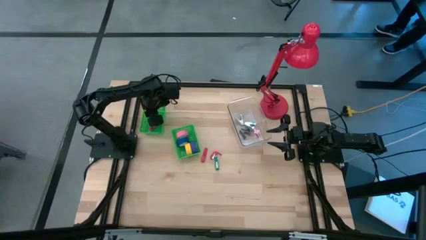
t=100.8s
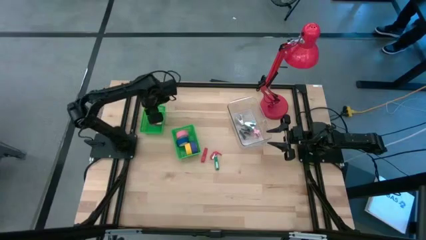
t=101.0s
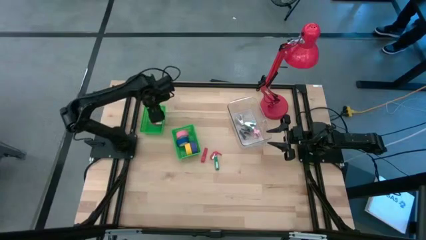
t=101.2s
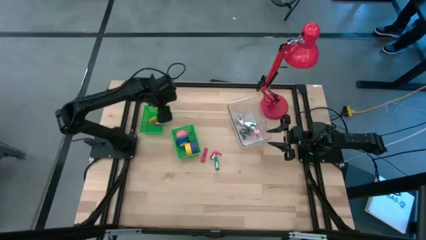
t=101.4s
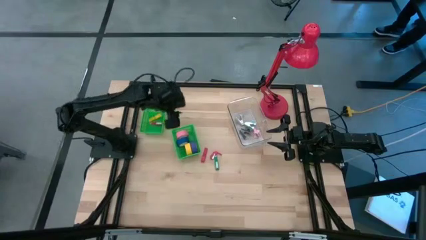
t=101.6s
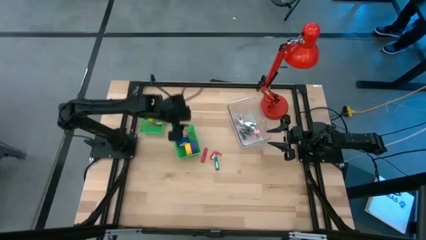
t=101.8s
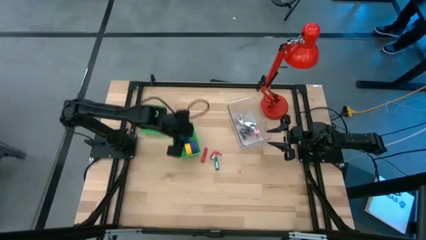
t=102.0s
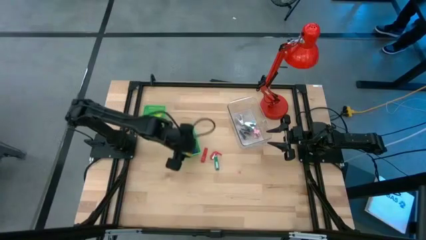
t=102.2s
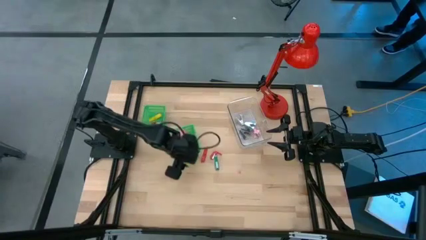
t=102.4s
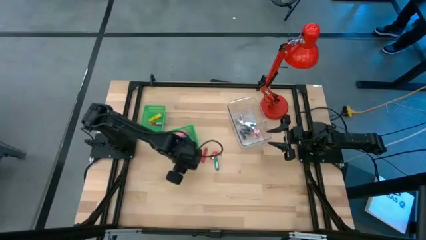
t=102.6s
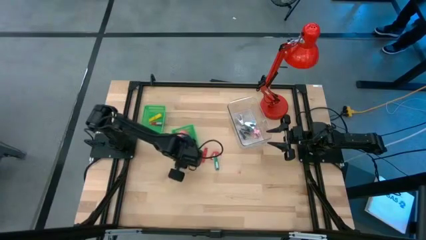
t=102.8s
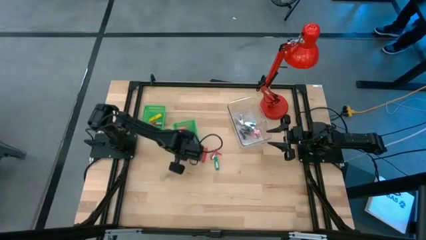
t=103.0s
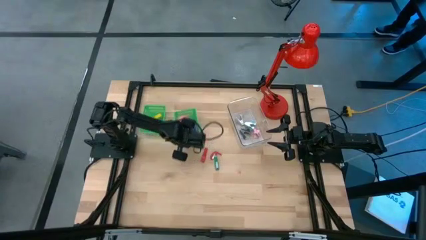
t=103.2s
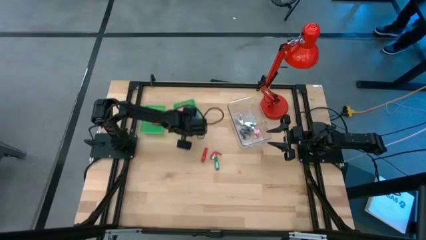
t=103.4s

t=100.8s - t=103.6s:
Task: Pick and place Stapler, Stapler remover, tape
Adjust the right green bin

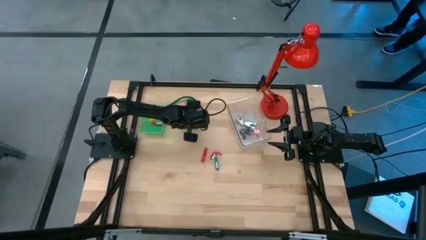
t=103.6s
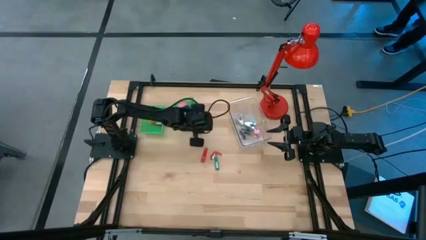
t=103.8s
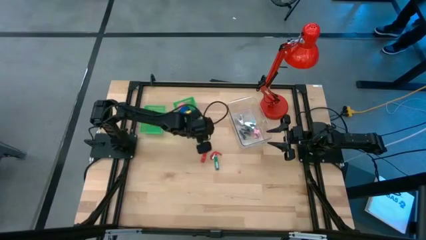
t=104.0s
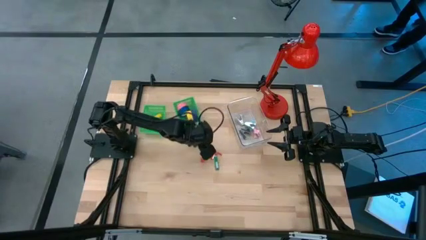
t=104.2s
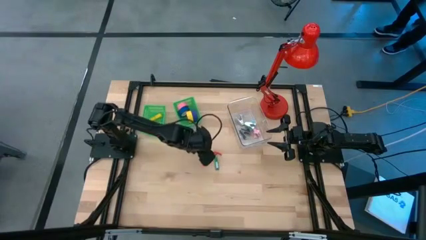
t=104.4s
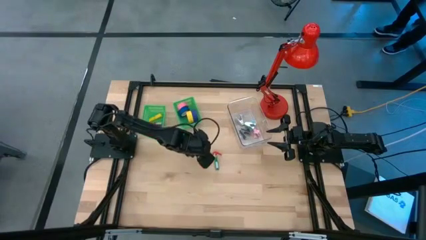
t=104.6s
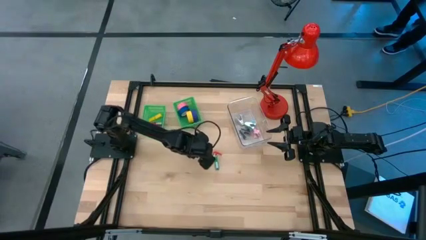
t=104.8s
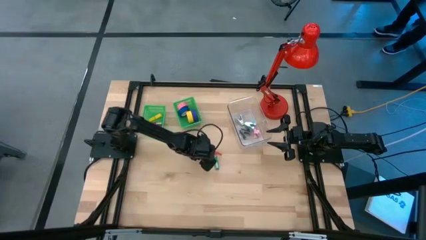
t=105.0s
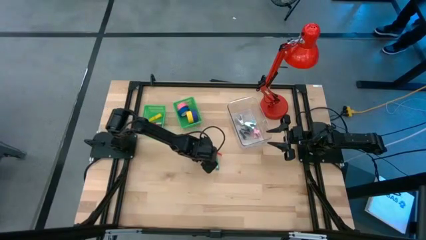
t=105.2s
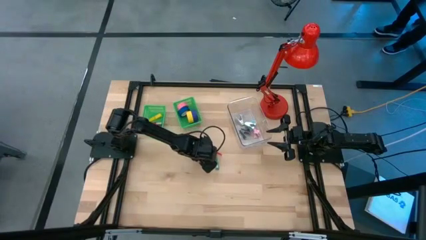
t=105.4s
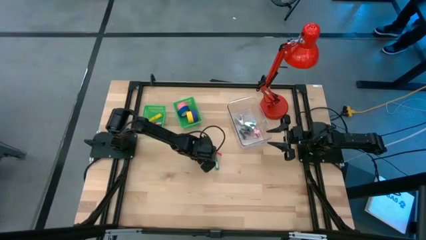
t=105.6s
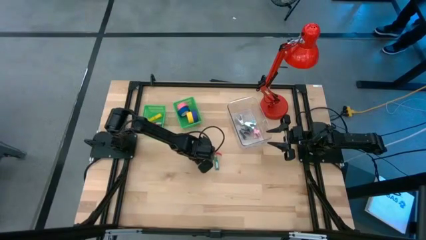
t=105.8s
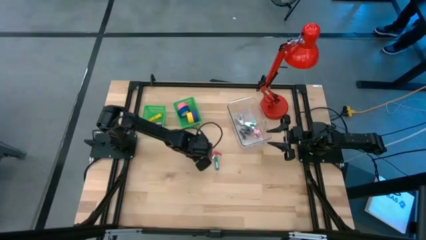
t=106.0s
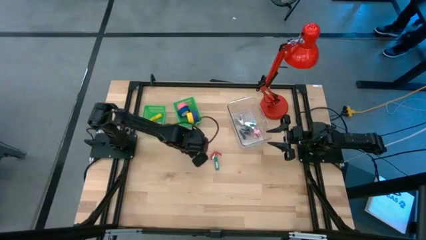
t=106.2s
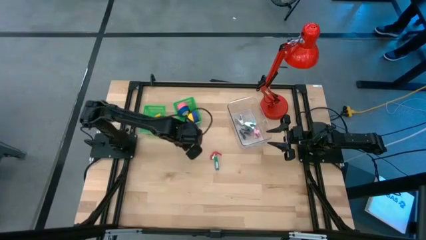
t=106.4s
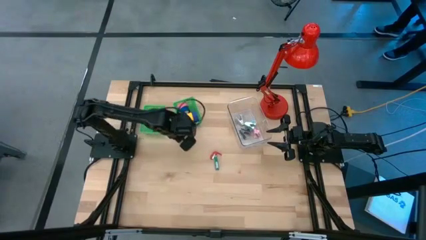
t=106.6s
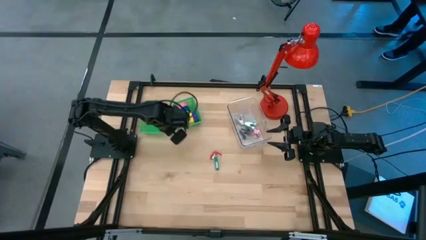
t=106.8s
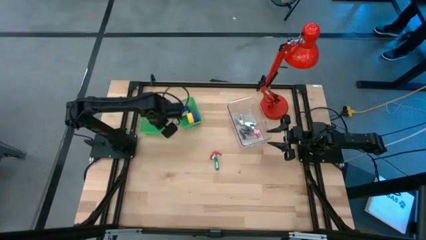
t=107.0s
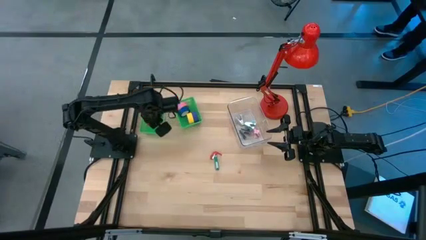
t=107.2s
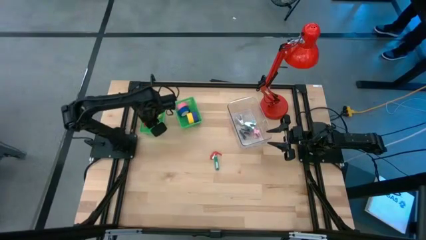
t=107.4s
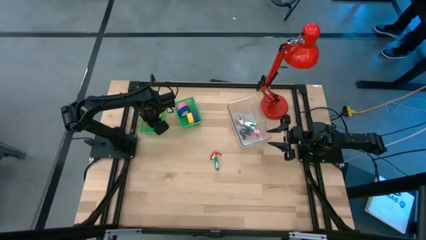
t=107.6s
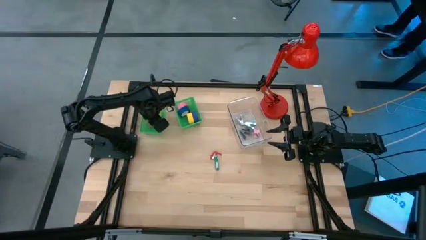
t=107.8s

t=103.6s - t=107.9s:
Put the red stapler into the left green bin

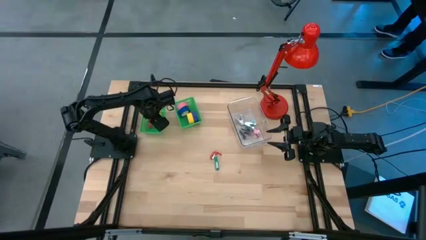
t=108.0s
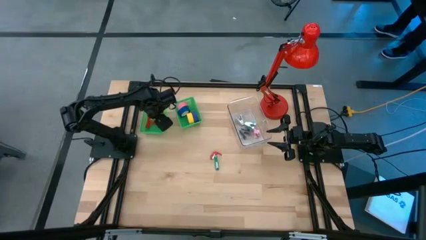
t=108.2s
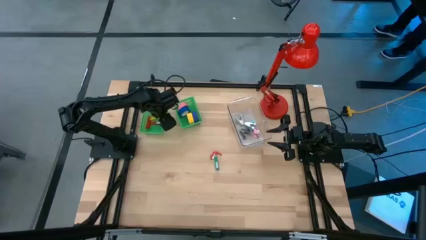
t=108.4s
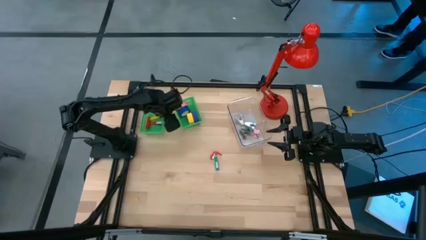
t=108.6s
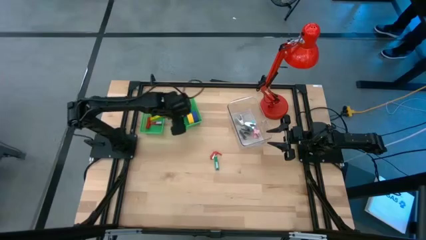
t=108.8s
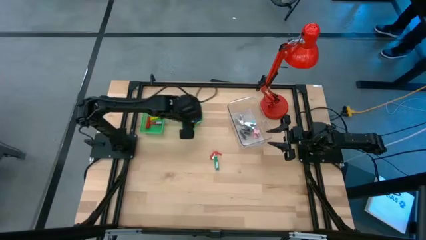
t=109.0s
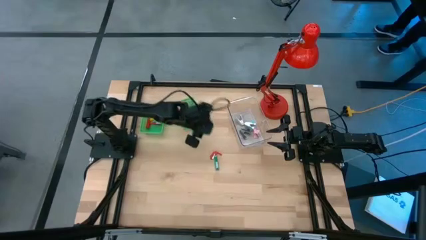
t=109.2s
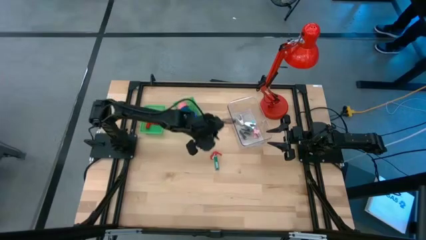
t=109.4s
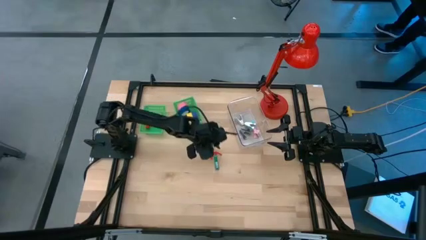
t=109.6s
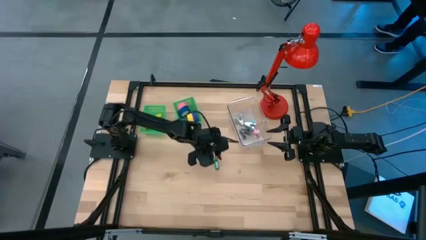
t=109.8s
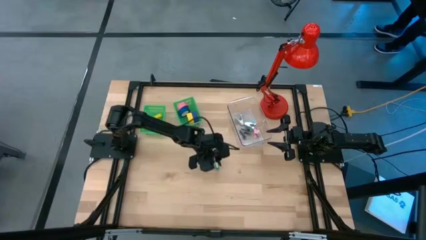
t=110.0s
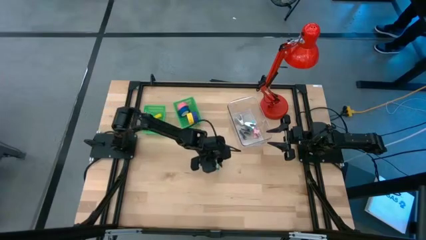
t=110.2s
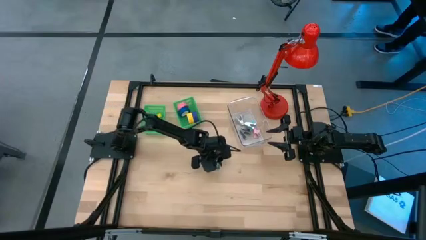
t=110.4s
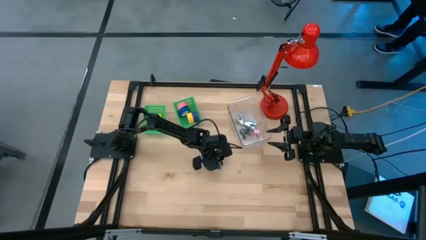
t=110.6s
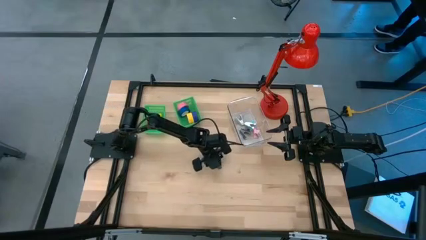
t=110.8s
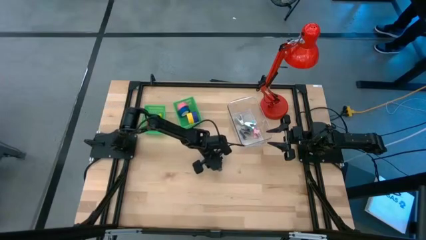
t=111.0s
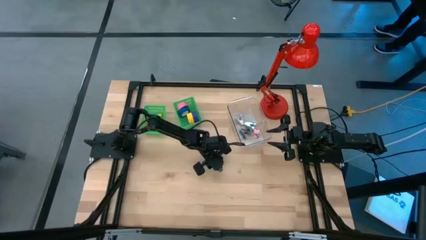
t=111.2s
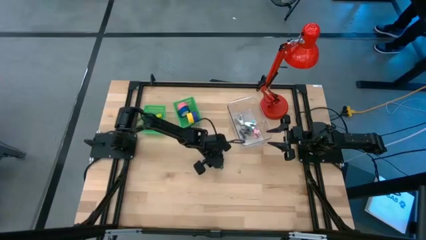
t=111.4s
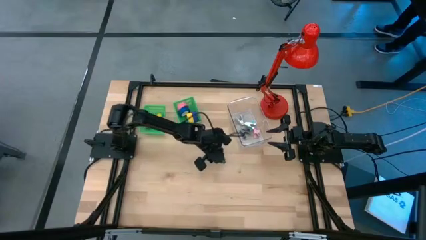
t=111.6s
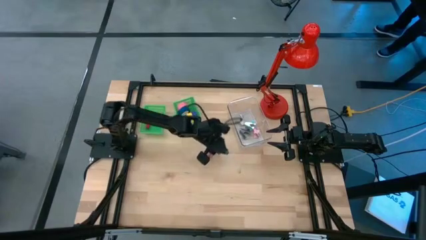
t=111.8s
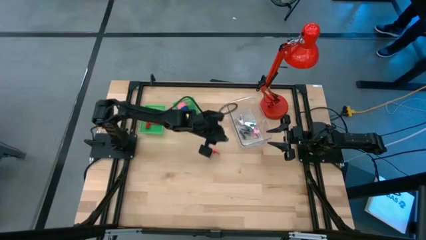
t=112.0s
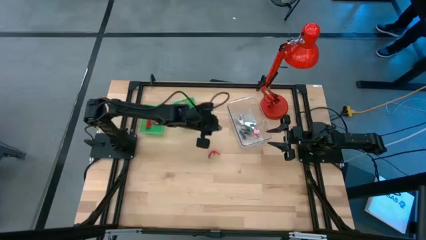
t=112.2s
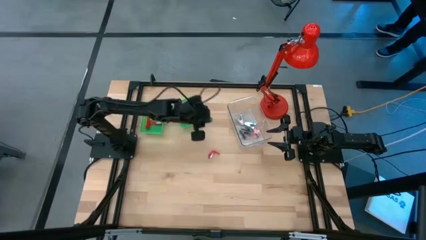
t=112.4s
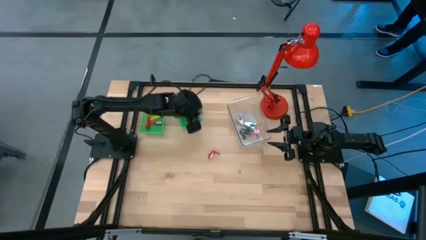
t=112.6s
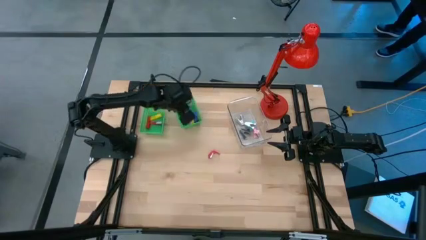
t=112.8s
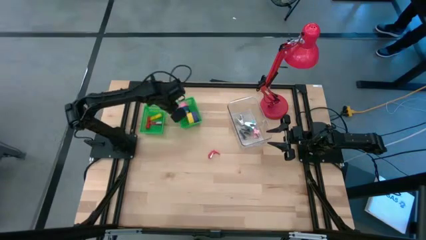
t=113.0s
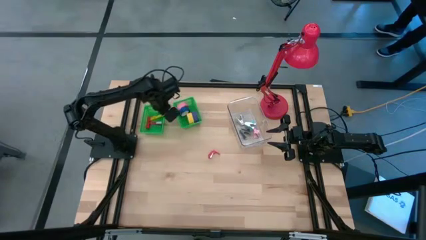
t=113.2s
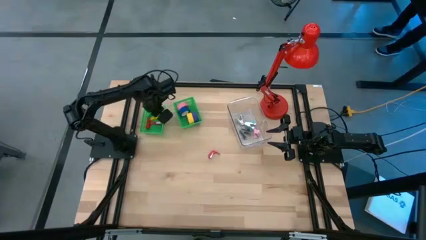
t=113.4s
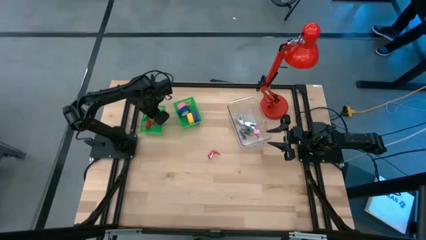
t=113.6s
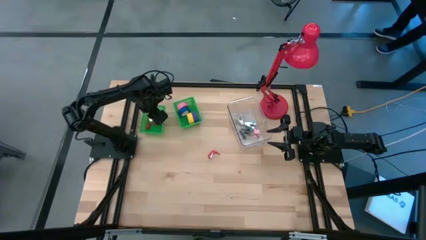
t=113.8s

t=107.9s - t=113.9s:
Put the green stapler into the left green bin

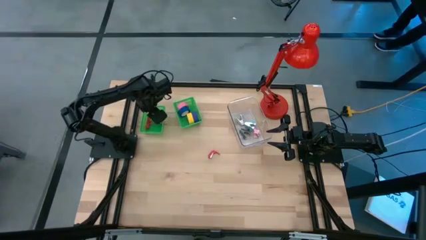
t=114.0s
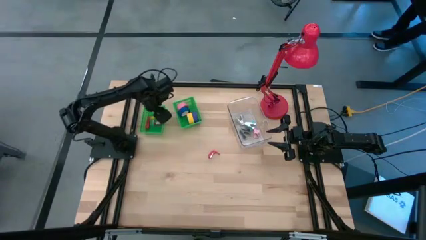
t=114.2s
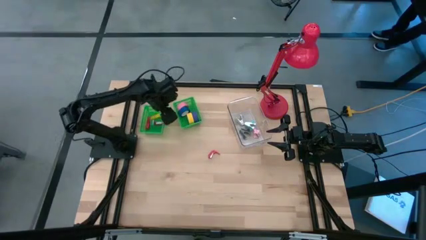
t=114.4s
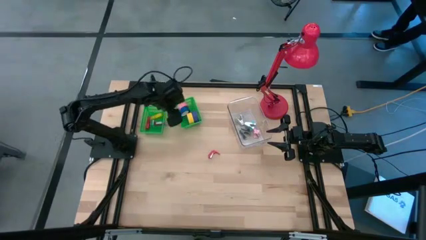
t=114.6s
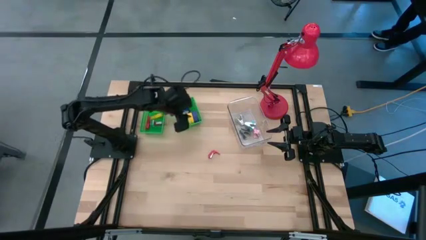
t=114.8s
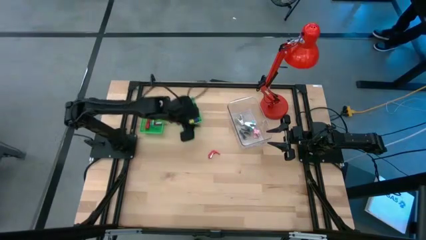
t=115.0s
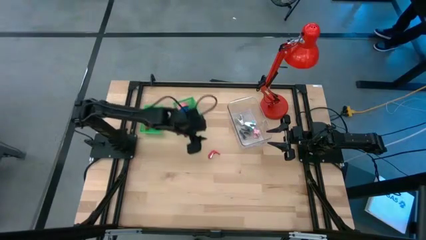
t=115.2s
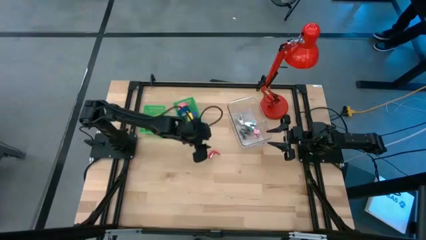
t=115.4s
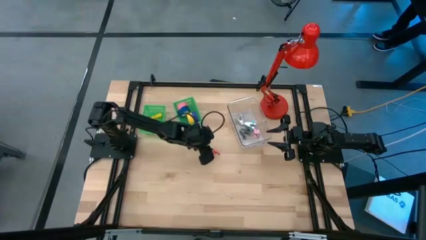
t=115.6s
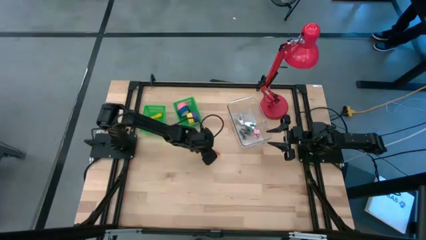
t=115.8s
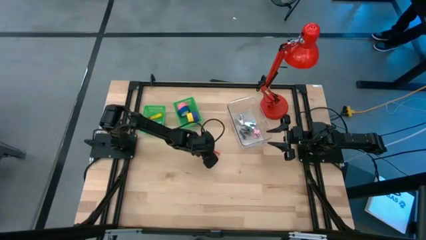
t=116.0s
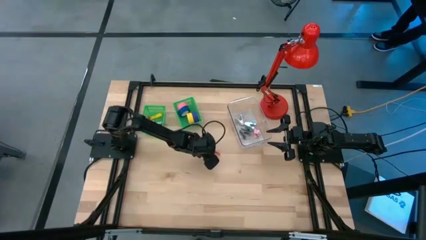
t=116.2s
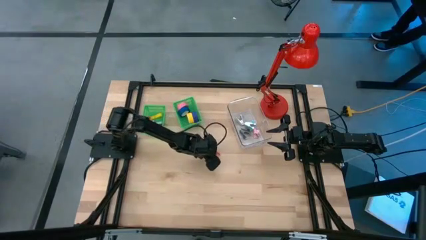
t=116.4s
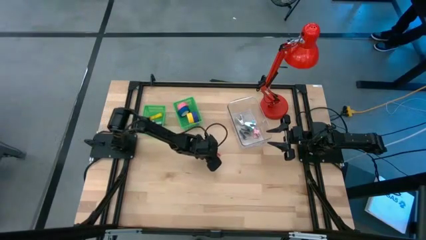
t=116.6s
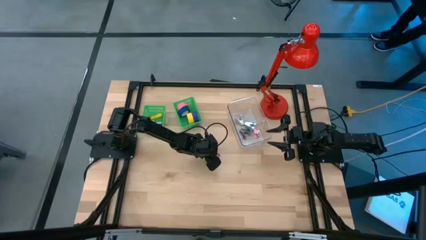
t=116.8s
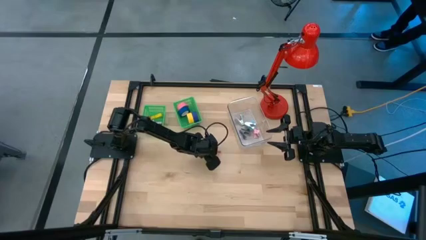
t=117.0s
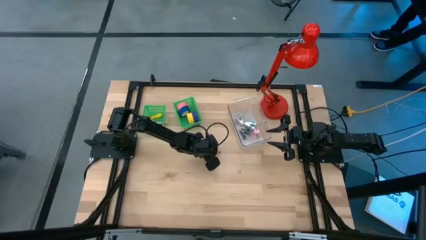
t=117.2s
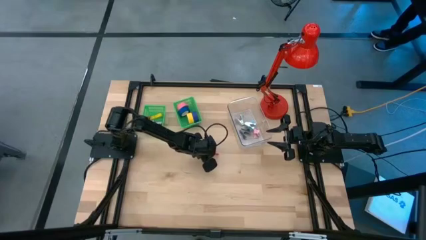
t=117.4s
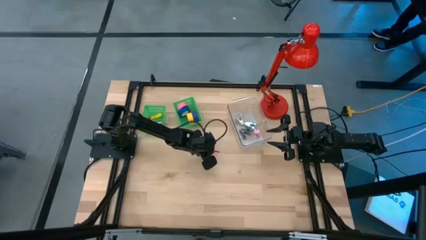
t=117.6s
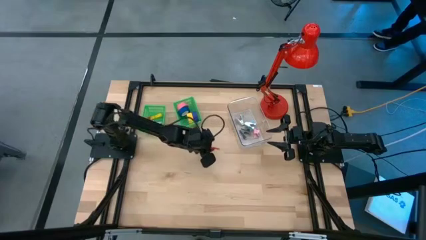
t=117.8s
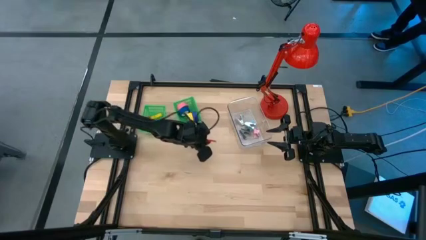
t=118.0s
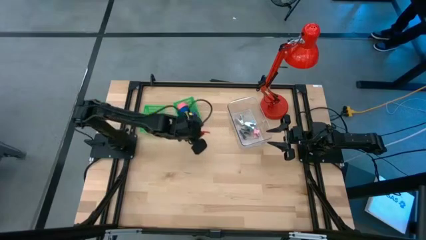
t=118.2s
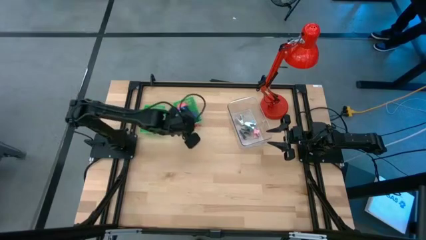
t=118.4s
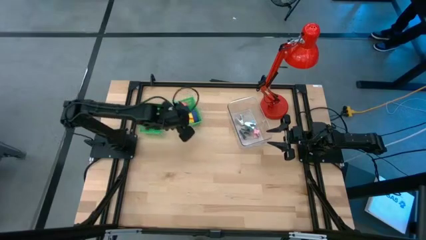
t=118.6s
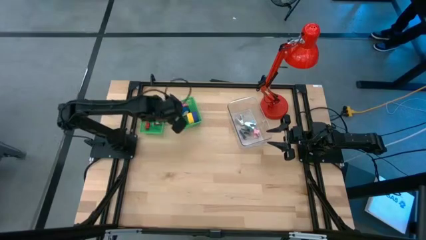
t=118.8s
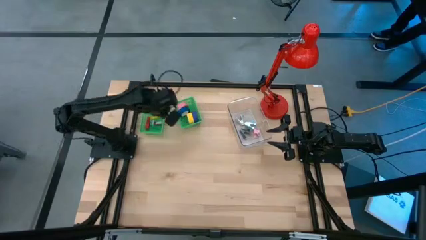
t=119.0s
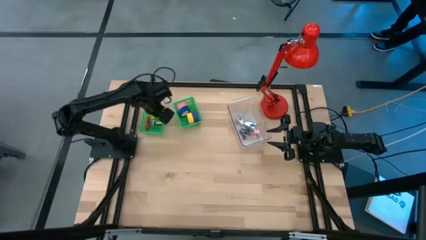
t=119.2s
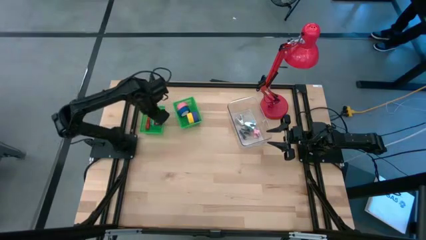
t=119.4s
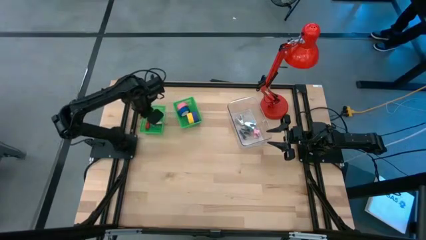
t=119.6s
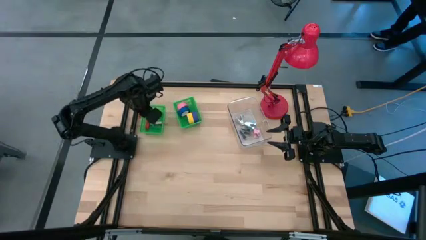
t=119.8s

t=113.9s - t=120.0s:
Put the red stapler into the left green bin
